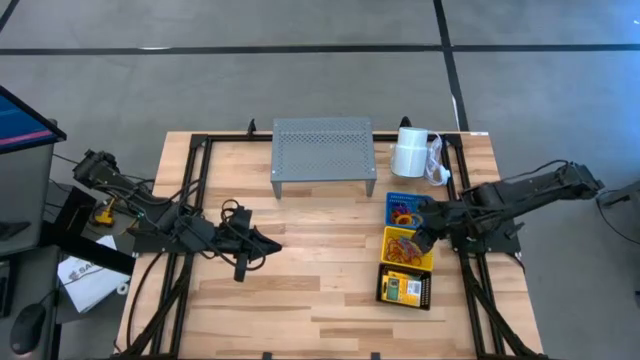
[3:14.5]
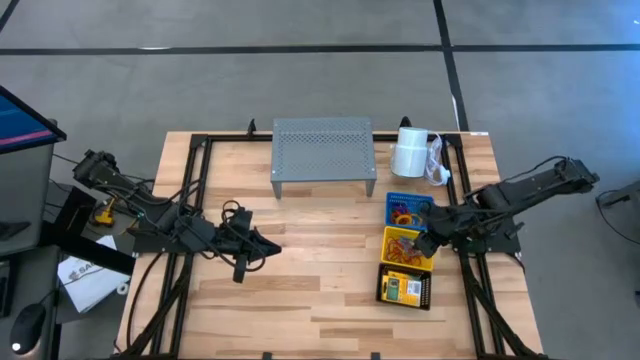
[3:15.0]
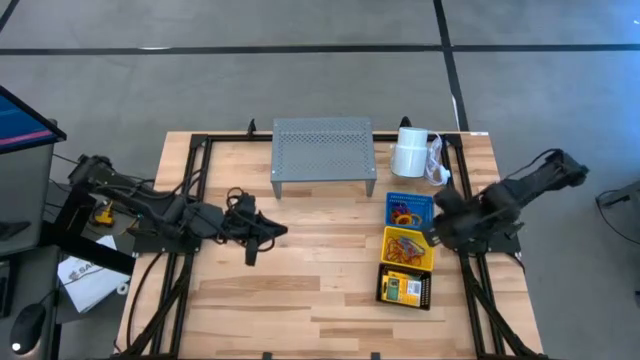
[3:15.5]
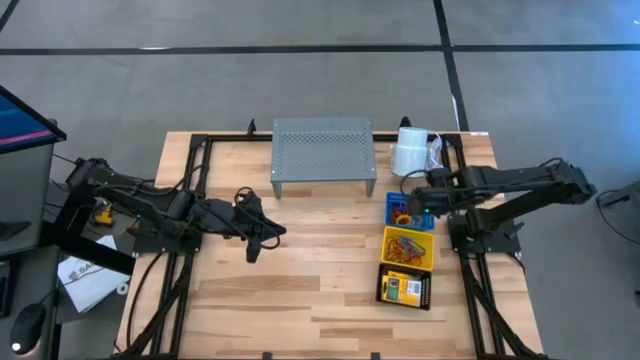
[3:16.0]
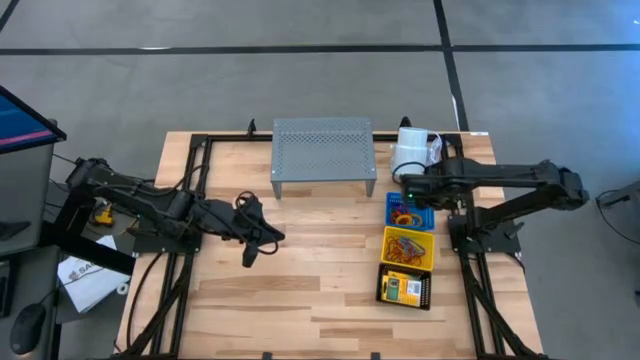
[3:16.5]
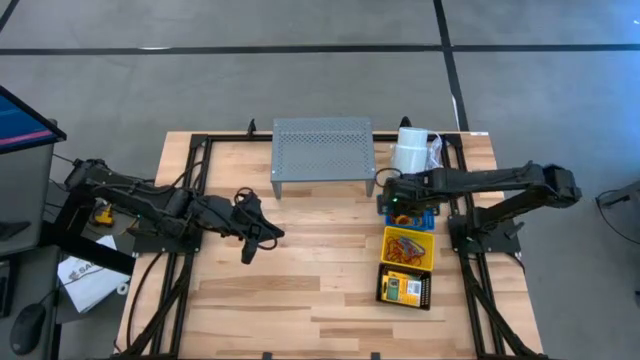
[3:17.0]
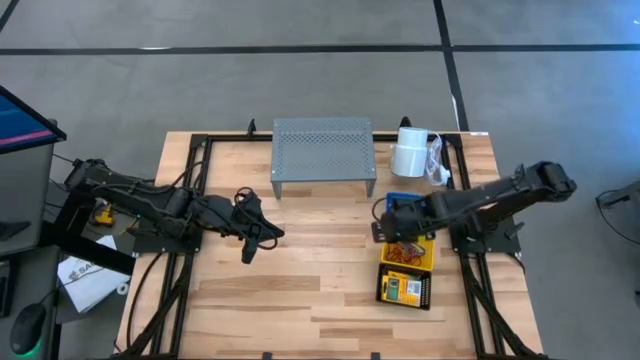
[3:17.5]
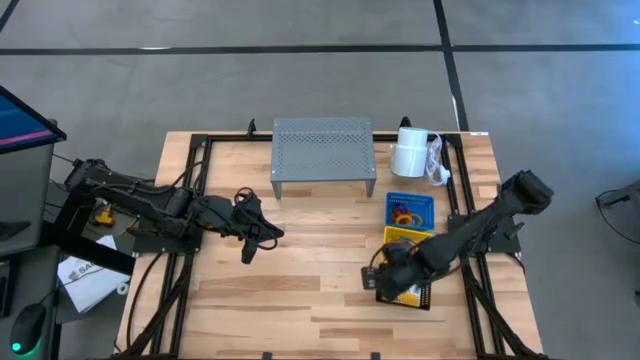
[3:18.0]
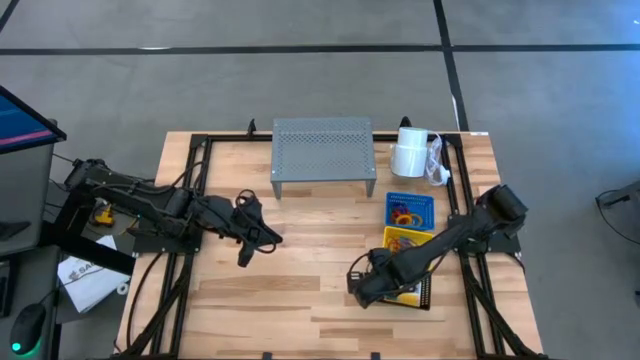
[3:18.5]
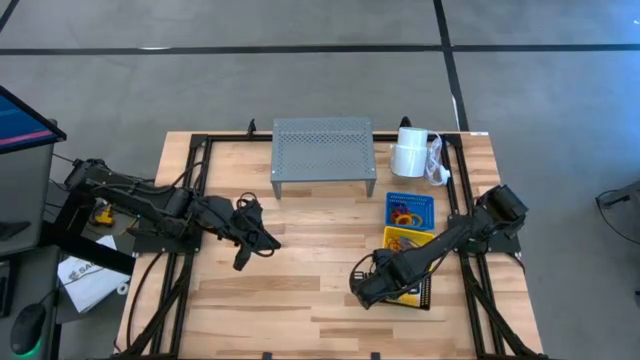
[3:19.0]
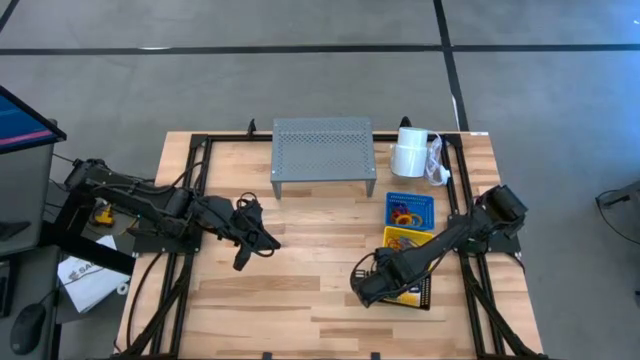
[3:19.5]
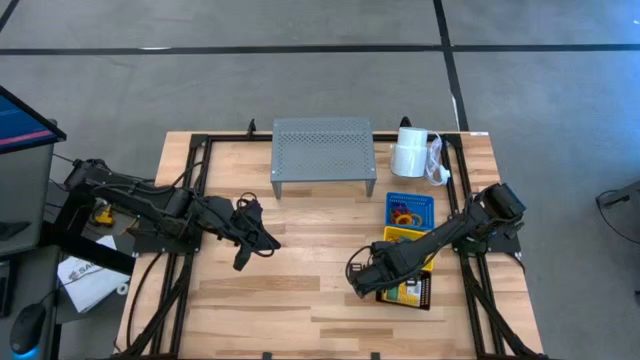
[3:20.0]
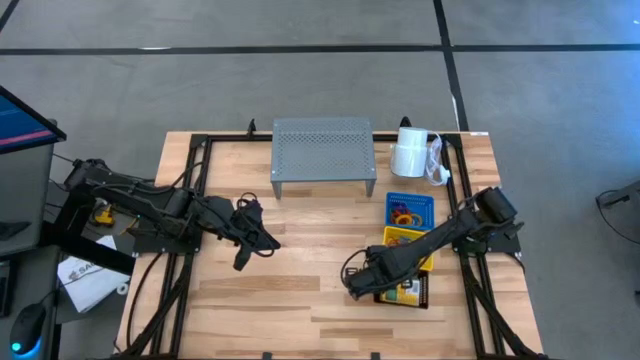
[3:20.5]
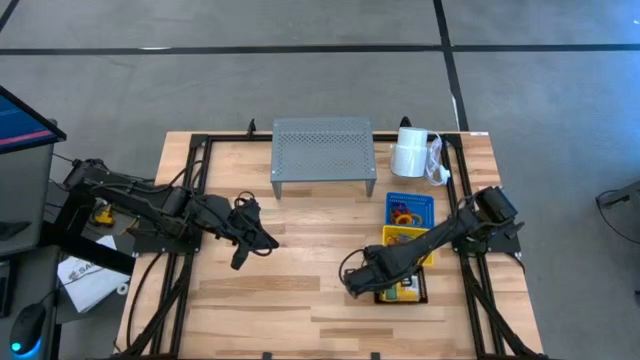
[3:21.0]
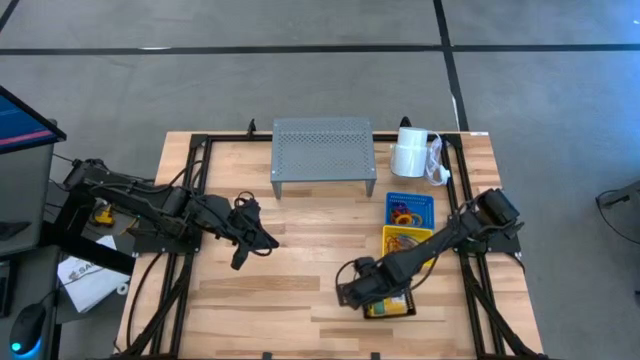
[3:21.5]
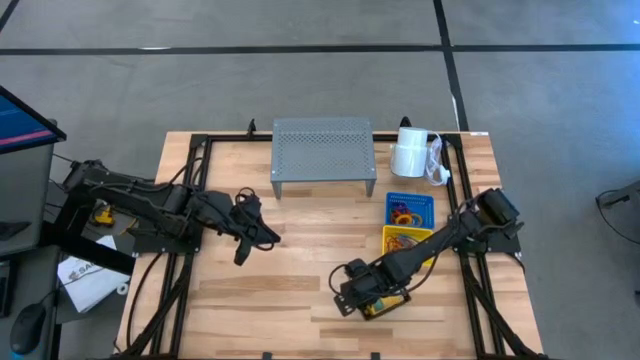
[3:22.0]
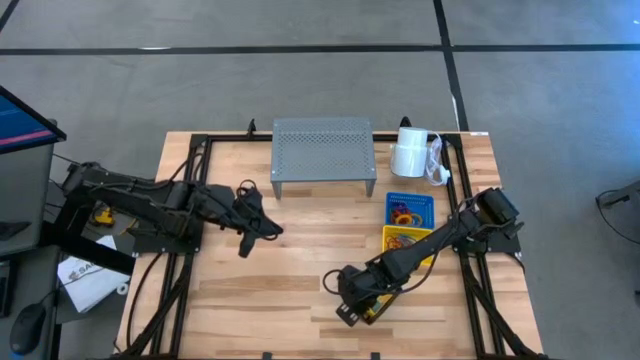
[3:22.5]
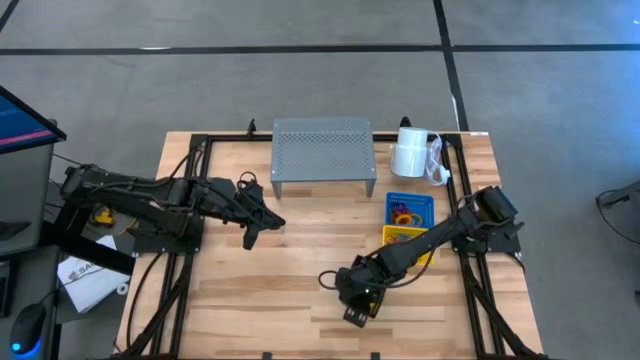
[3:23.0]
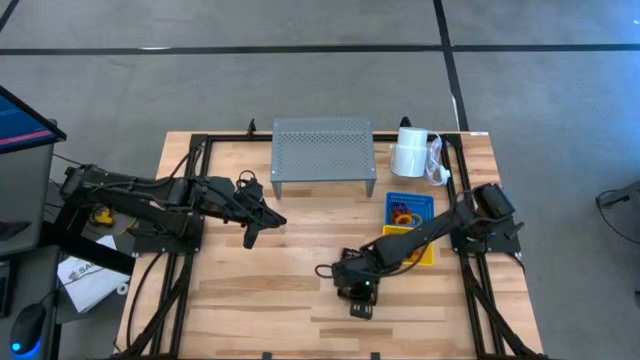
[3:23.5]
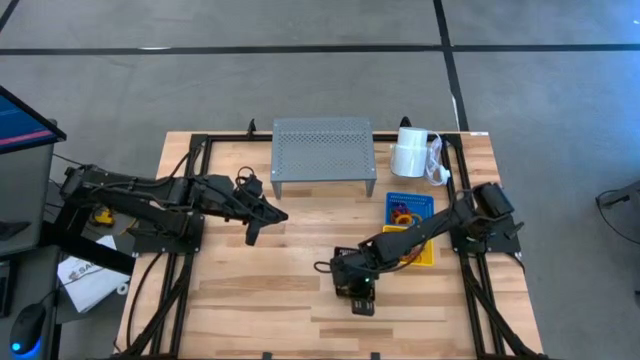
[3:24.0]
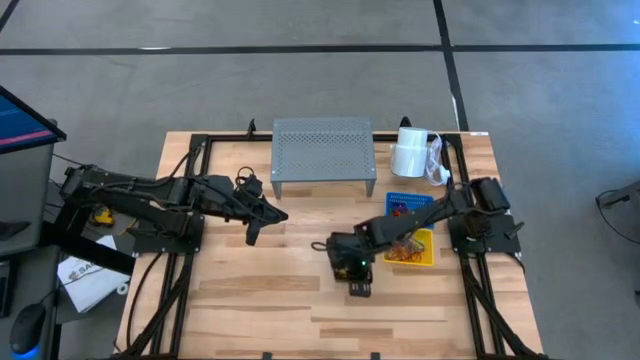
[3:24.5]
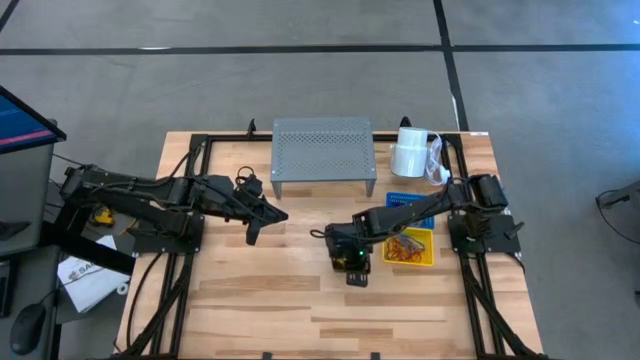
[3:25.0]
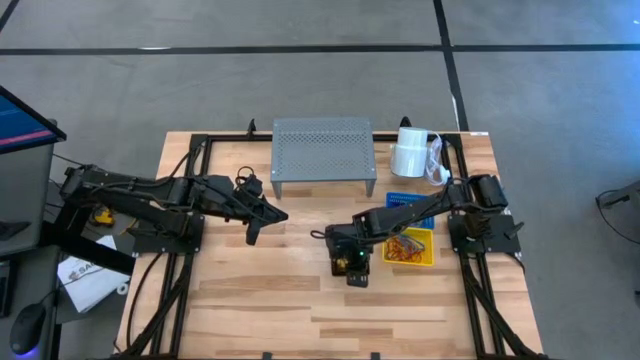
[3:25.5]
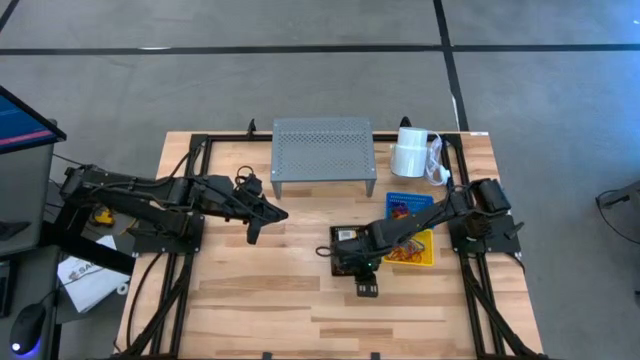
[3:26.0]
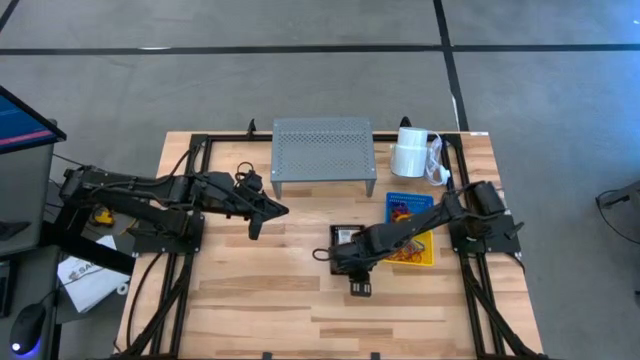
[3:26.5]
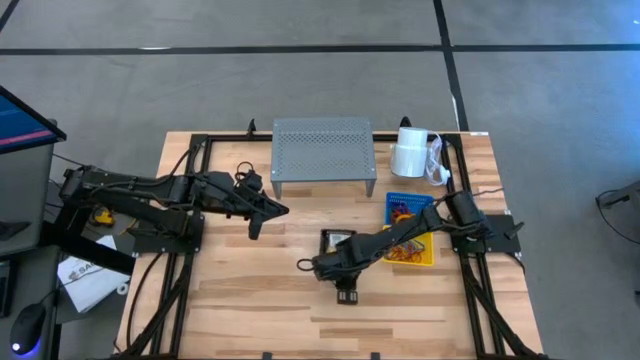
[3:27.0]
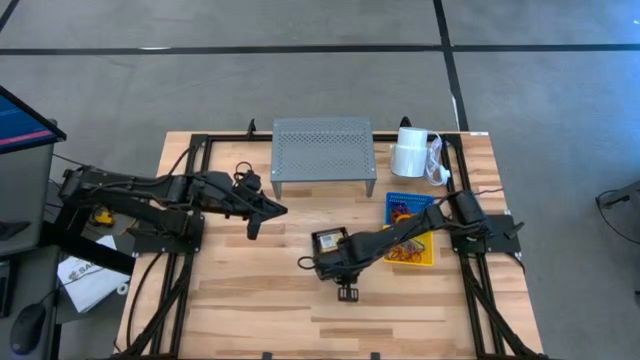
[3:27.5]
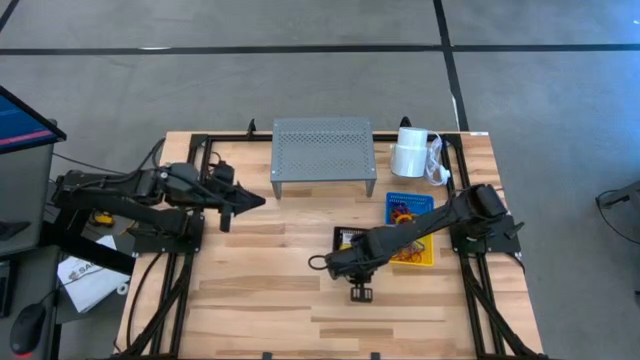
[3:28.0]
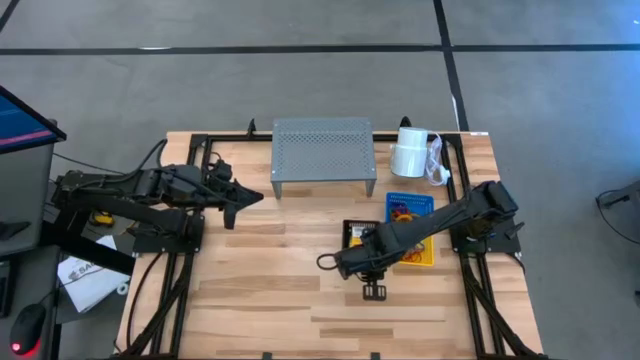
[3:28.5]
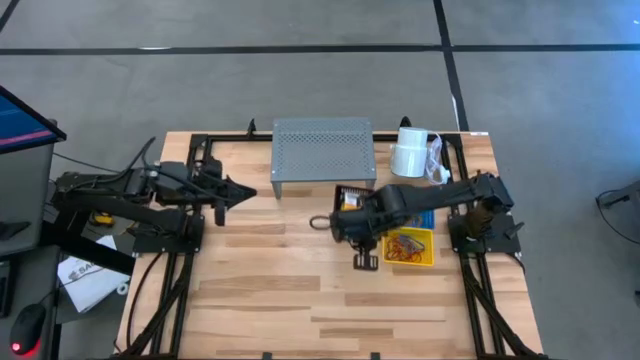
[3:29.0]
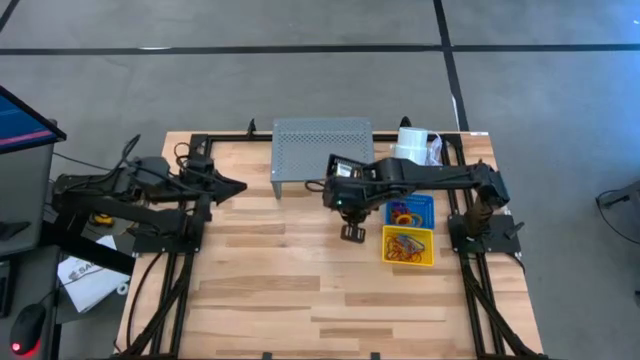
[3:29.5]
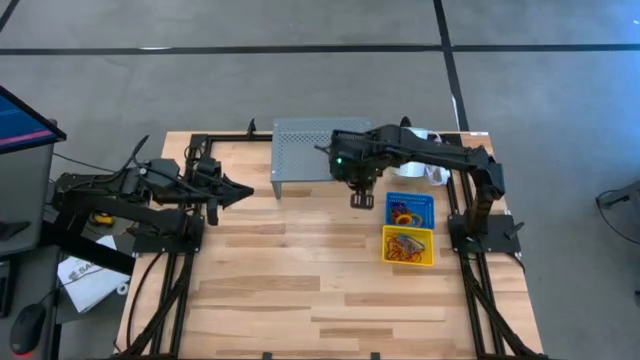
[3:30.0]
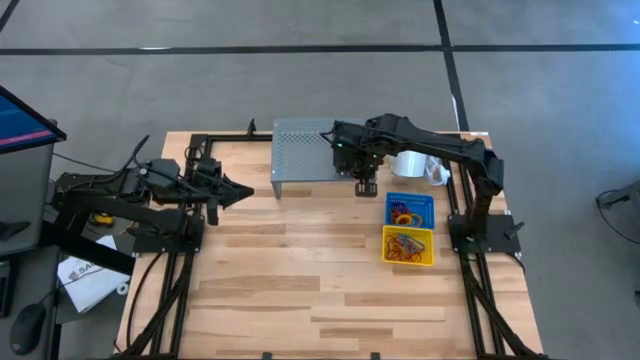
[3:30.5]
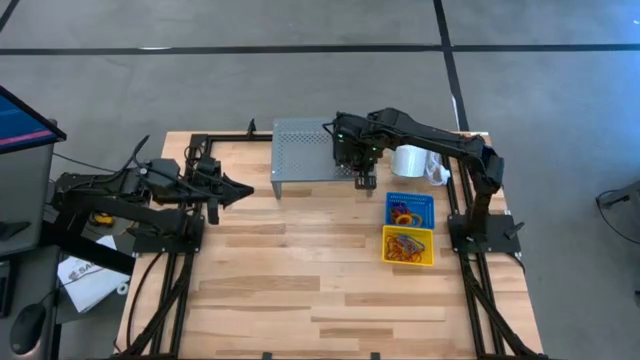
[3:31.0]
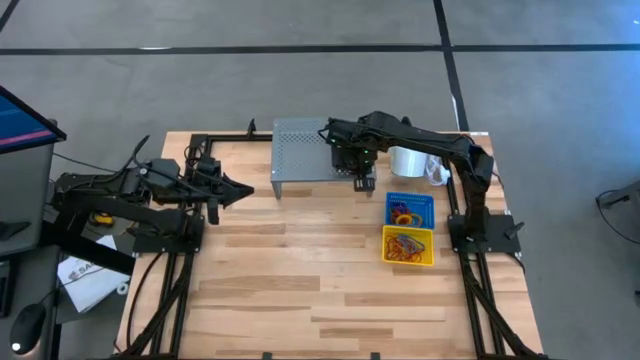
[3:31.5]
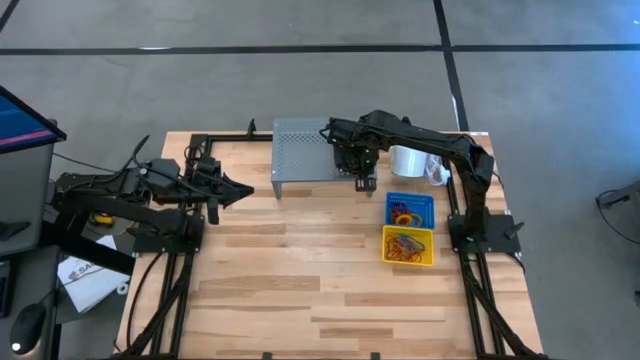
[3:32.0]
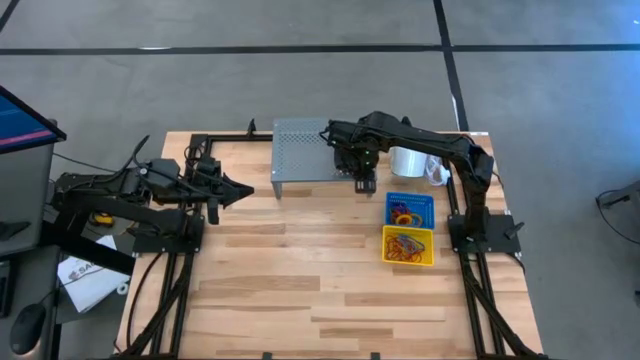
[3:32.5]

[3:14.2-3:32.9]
Task: Pick & Place Office Desk Supplies
Put the black basket on the shelf

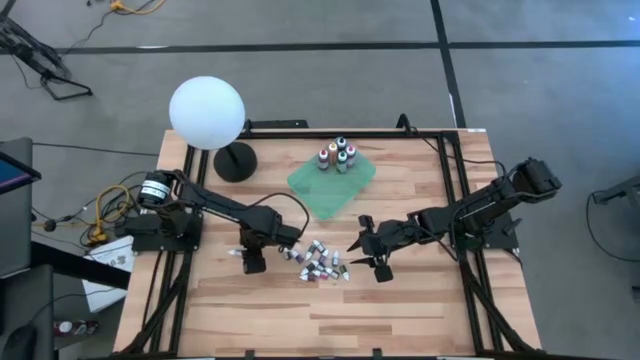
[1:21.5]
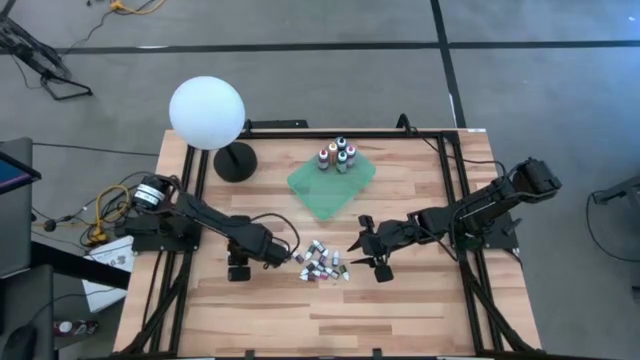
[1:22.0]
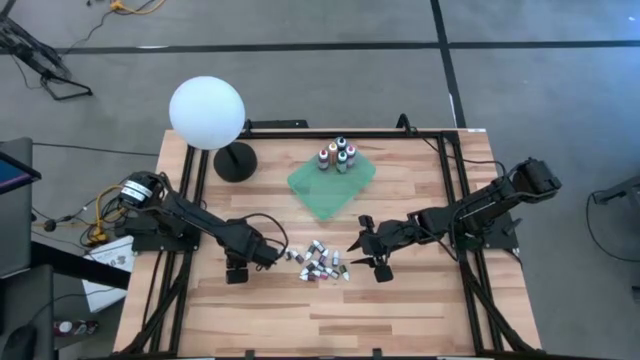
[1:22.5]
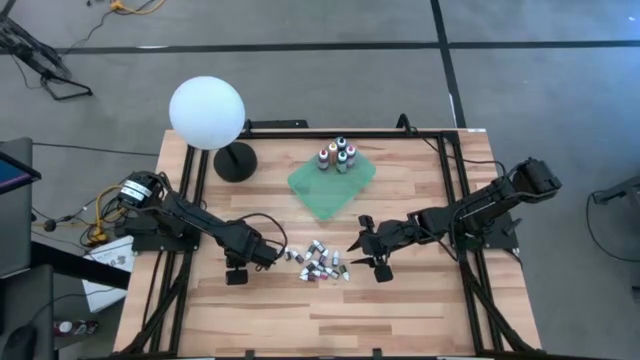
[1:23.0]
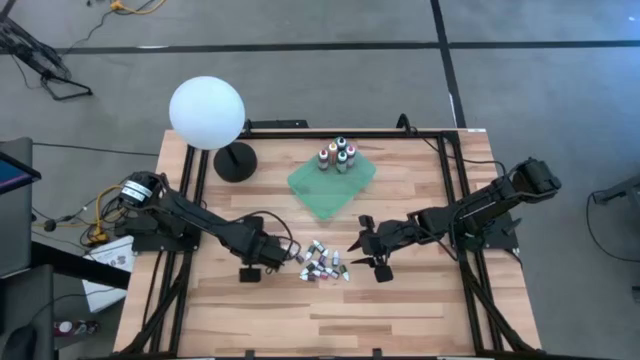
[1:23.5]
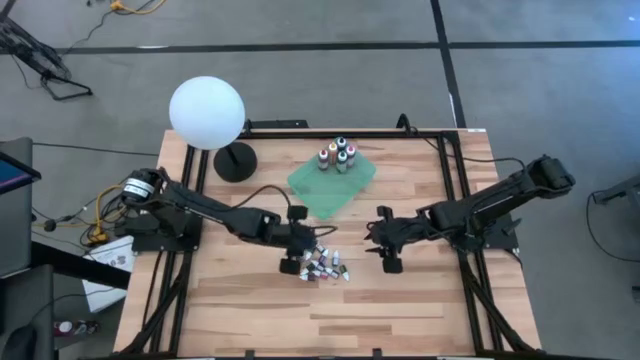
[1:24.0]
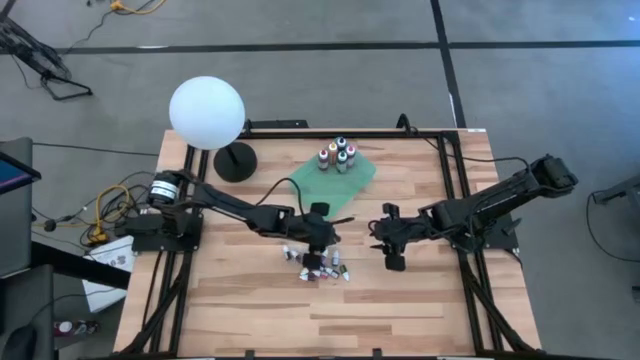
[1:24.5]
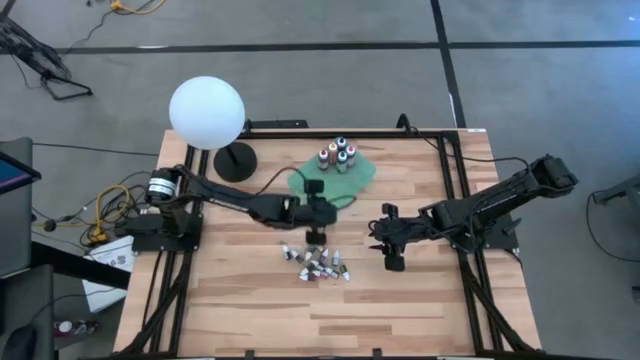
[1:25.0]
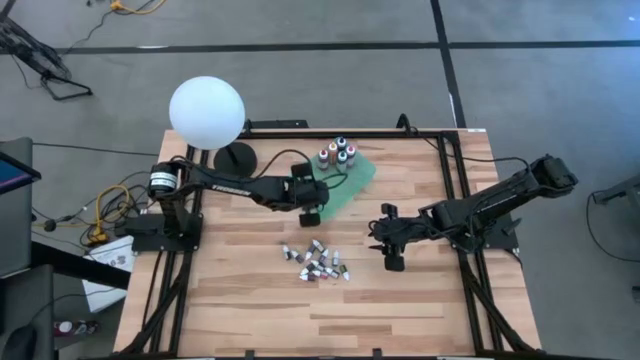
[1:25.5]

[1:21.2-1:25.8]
Task: Pick & Place food coloring
Put the top red food coloring bottle into the green bin
